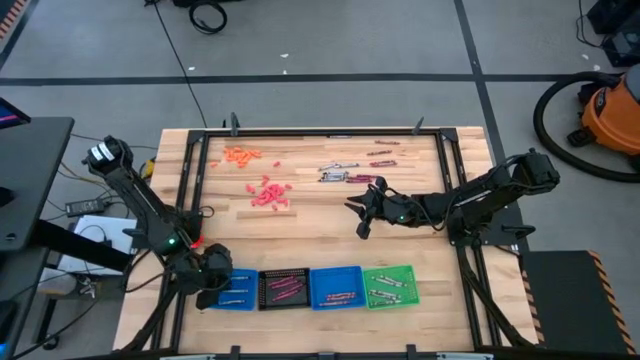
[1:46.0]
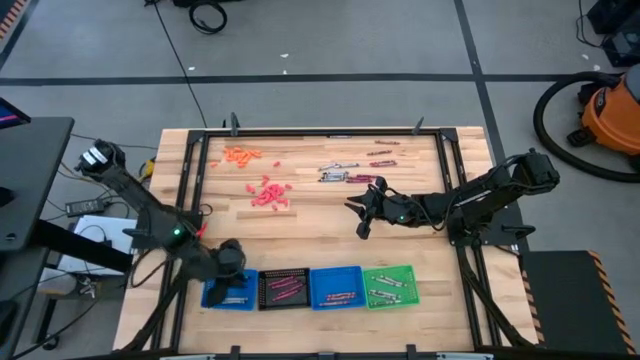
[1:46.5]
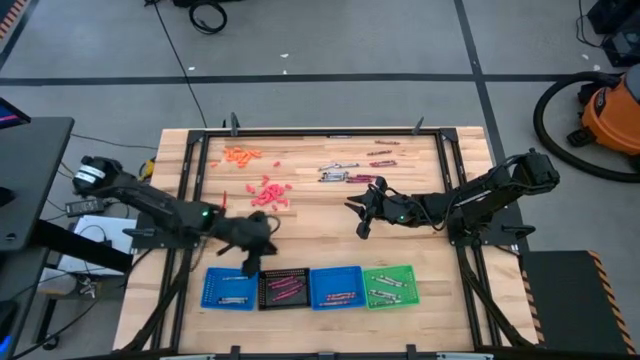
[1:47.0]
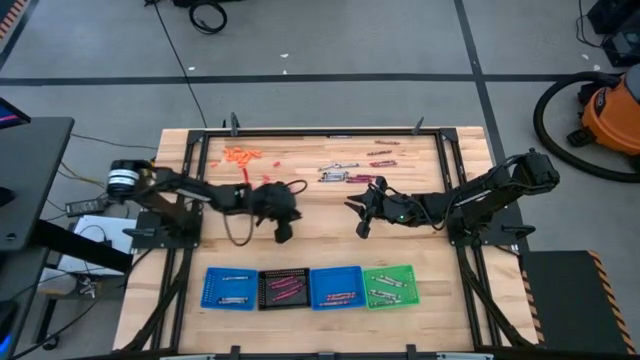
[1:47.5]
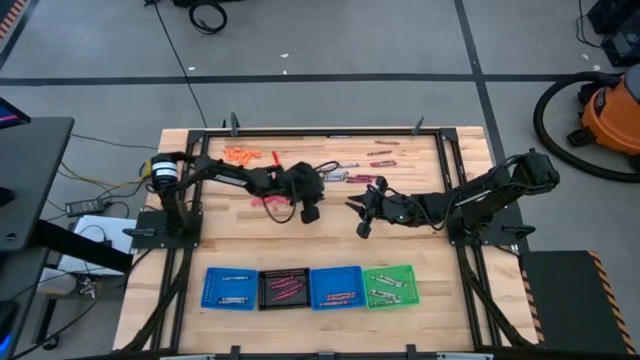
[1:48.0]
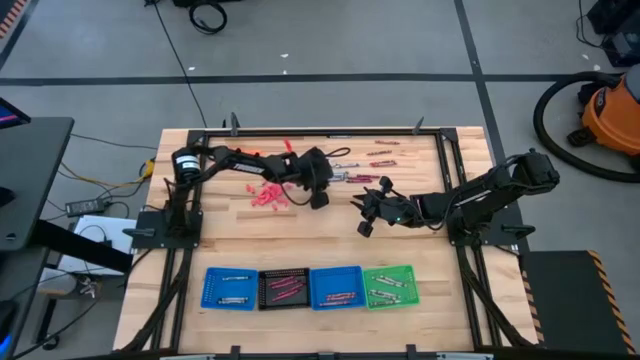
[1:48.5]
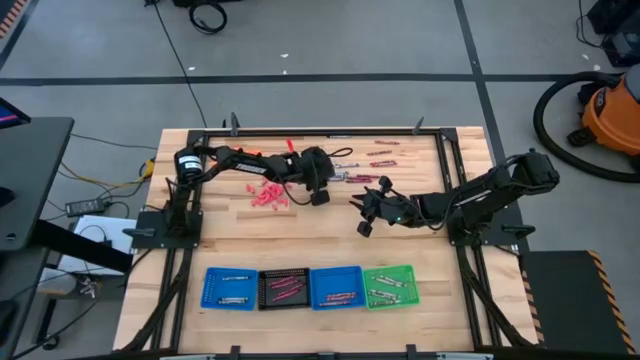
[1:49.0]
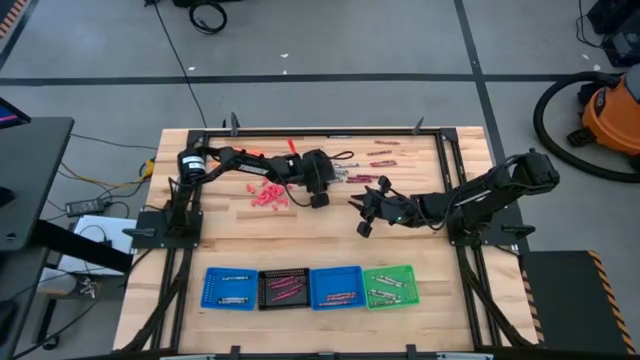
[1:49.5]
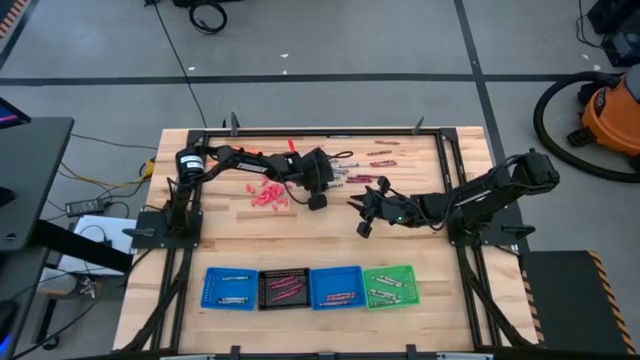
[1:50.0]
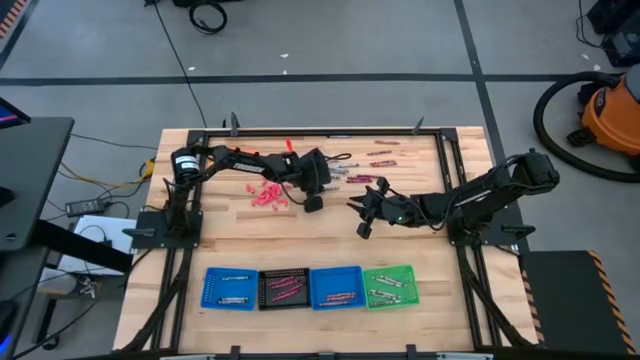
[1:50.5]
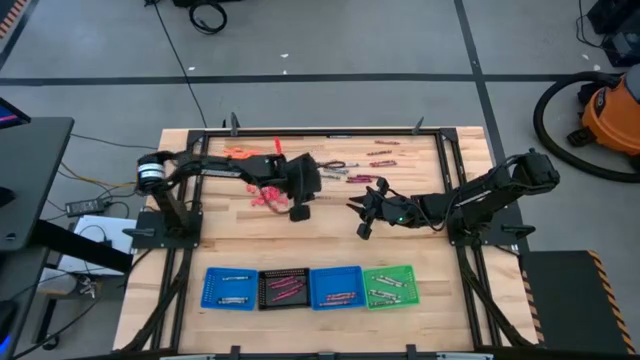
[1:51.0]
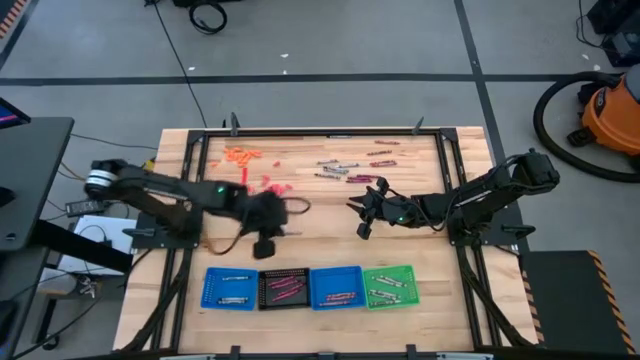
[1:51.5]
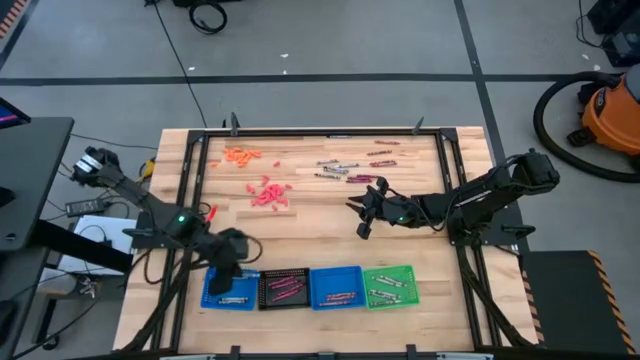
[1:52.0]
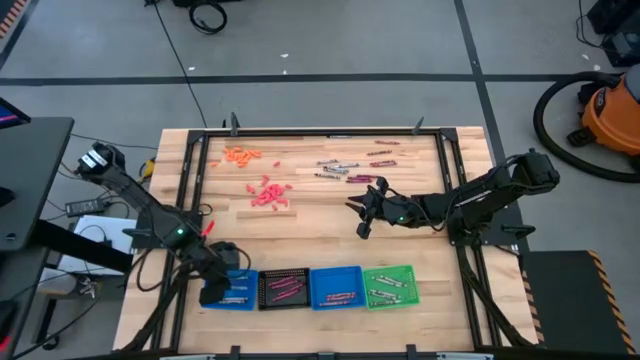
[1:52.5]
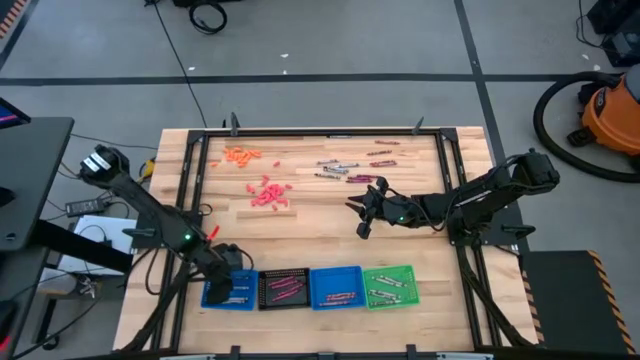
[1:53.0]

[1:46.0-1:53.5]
Task: Sort crayons
Put the black crayon into the left blue bin

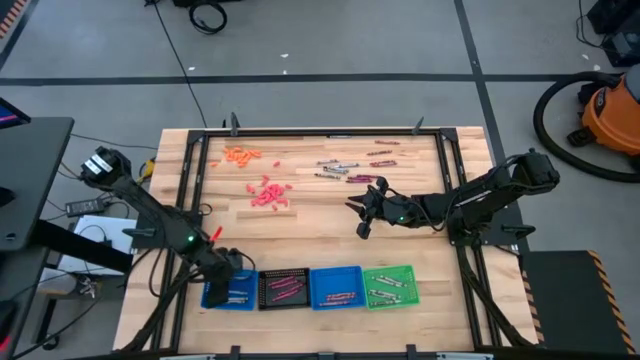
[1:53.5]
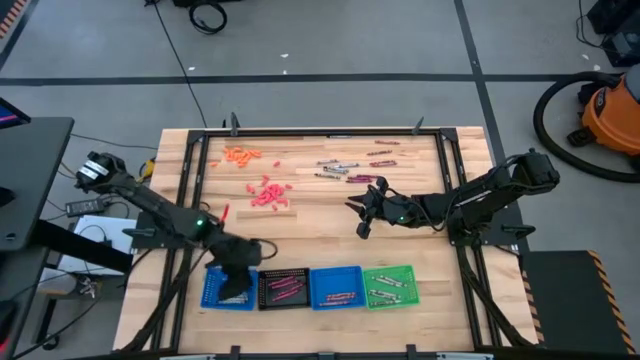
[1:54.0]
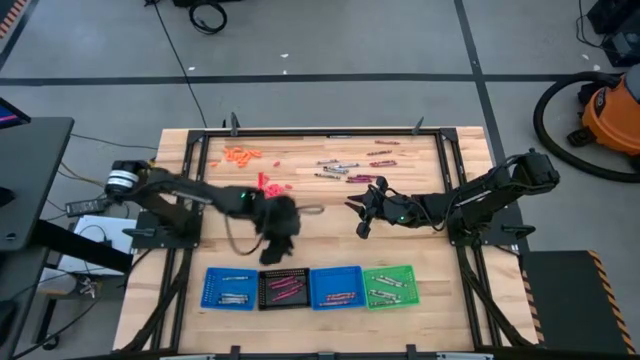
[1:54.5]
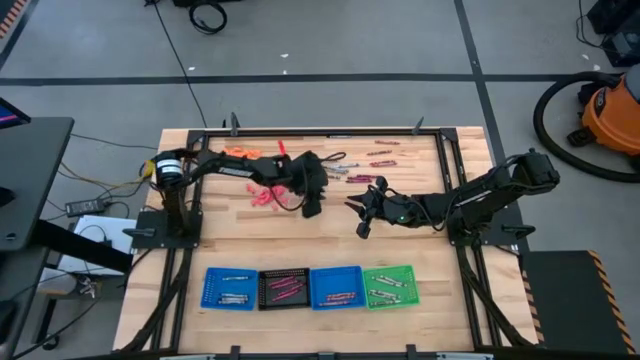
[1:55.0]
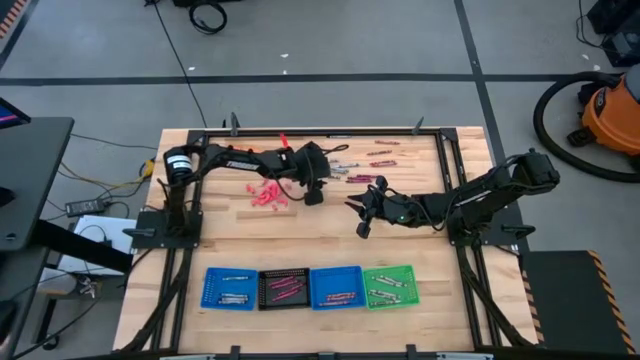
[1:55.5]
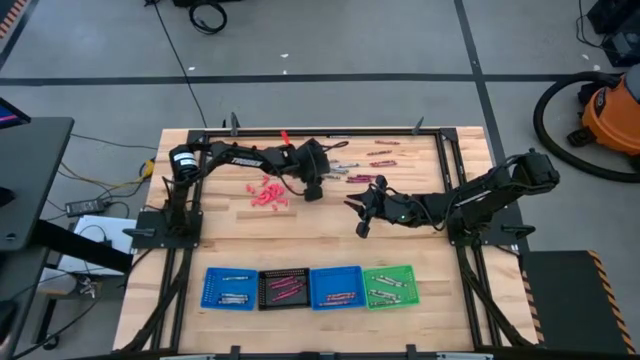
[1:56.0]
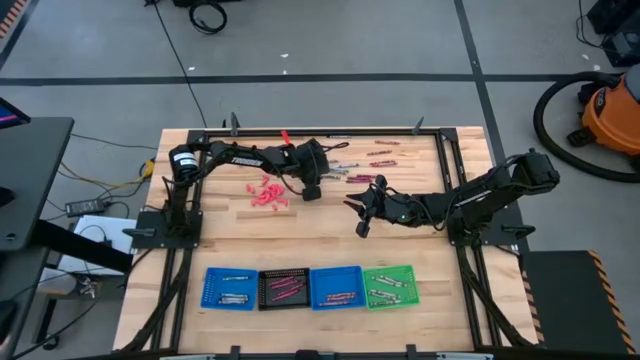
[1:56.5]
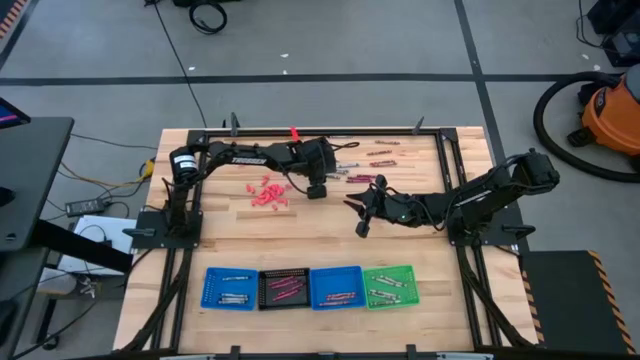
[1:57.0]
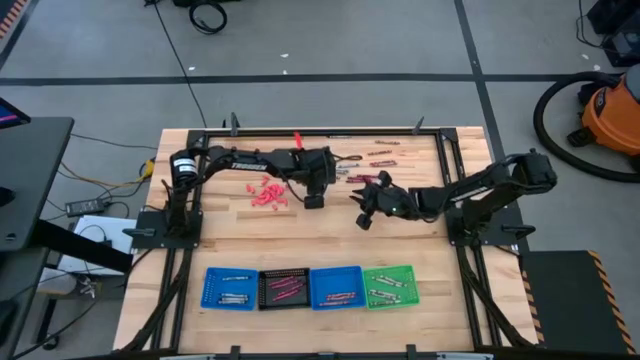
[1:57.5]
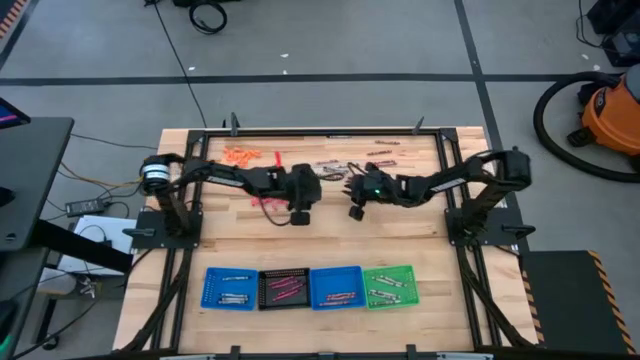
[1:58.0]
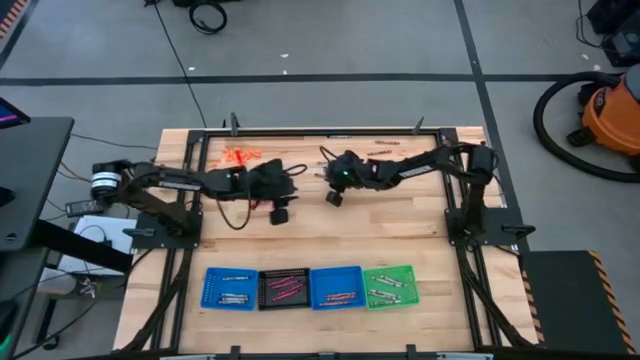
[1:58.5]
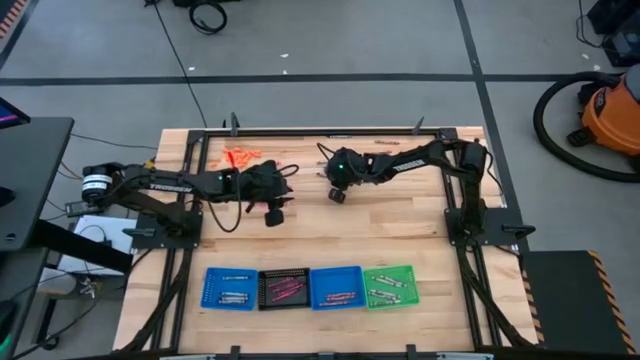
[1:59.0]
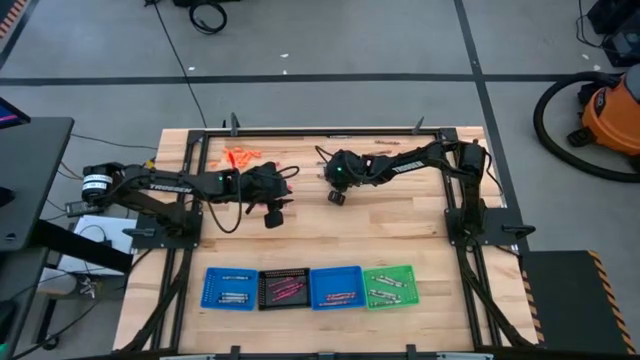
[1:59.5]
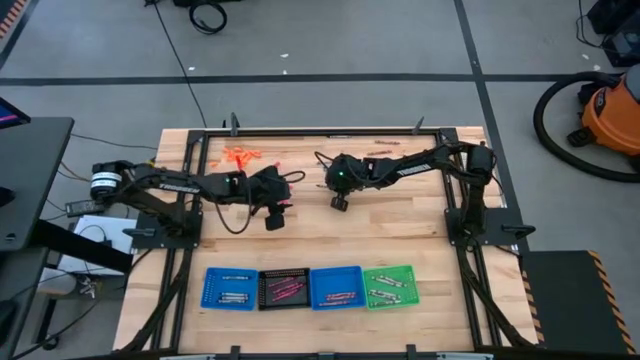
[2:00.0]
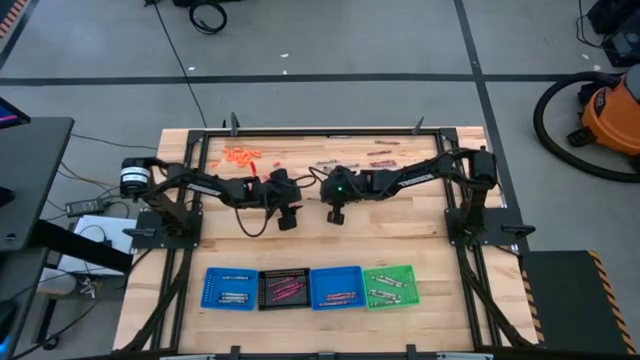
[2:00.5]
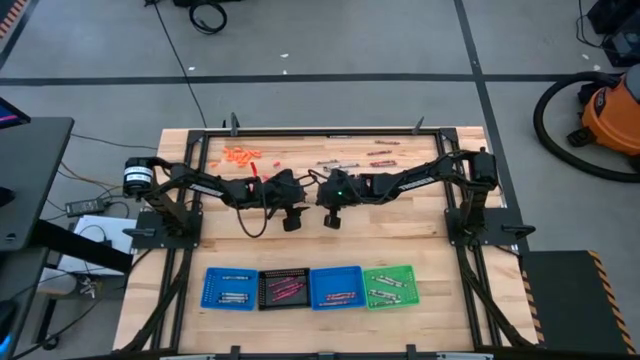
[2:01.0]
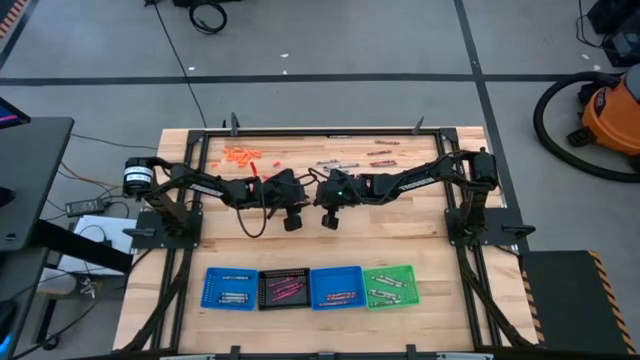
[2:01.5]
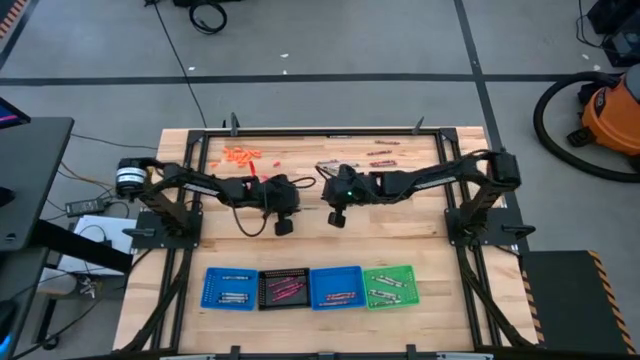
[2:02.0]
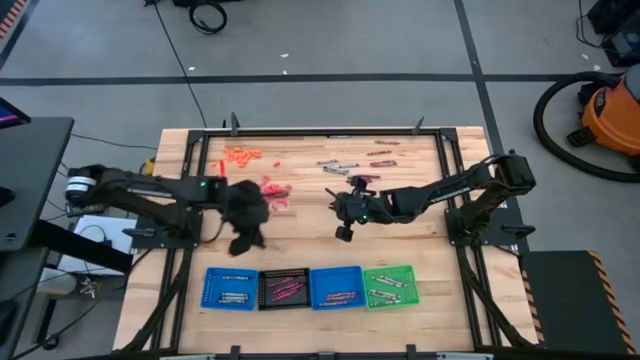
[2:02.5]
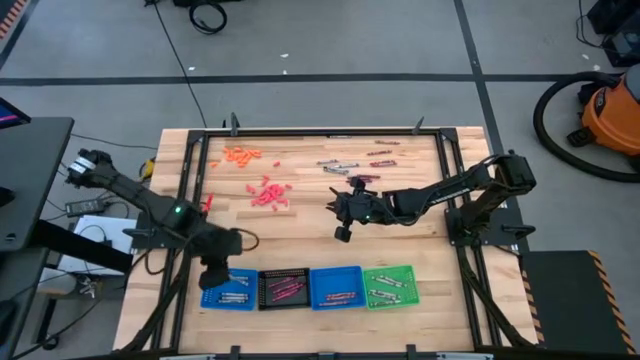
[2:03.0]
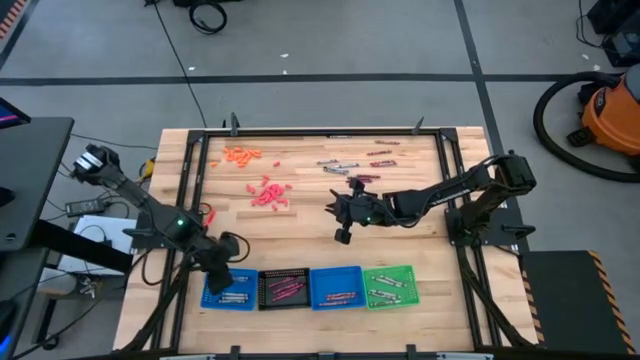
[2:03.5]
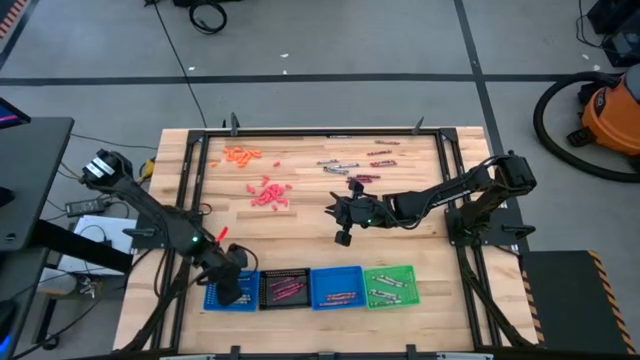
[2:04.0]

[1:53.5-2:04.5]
Put the black crayon into the left blue bin

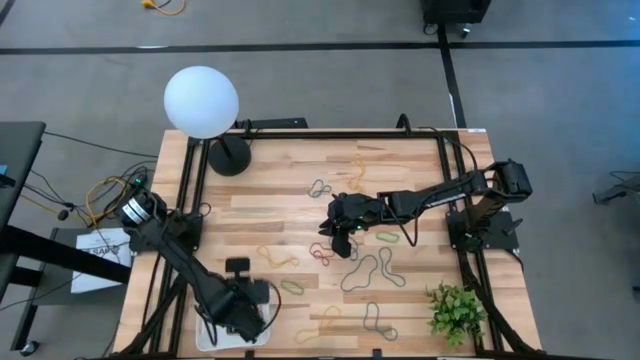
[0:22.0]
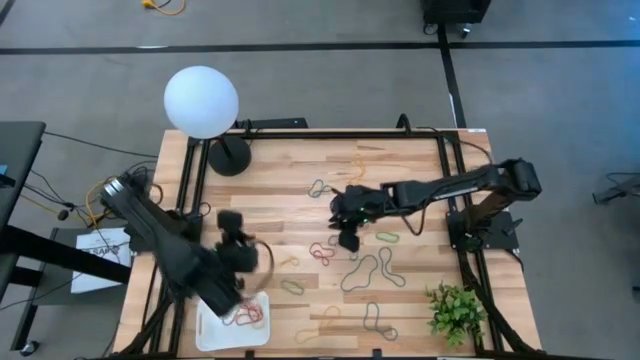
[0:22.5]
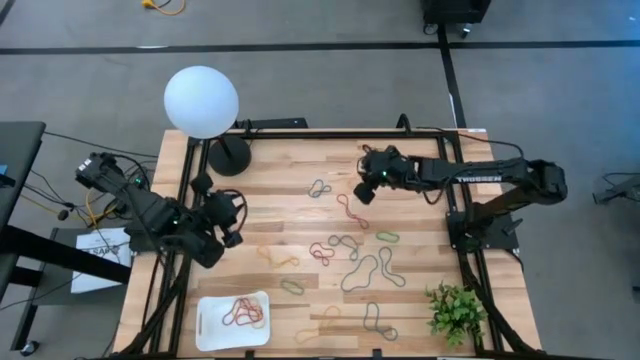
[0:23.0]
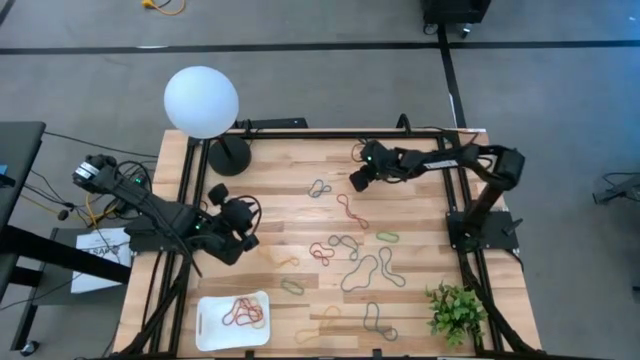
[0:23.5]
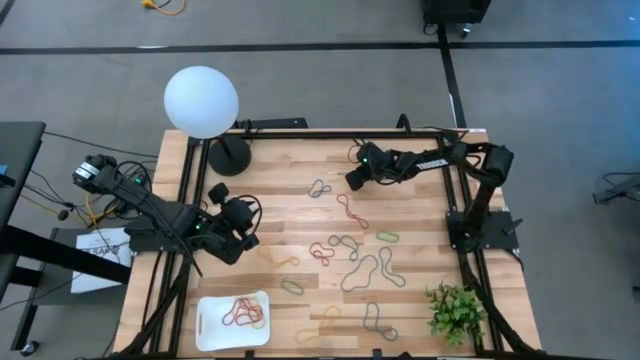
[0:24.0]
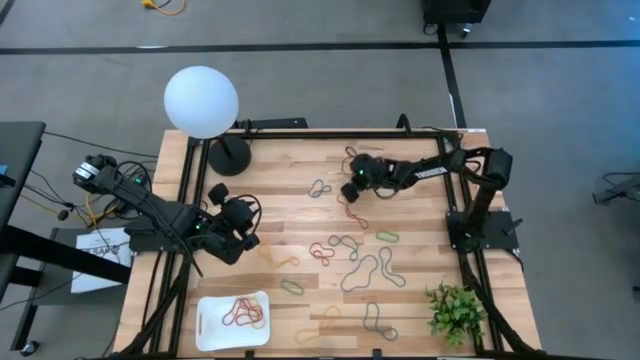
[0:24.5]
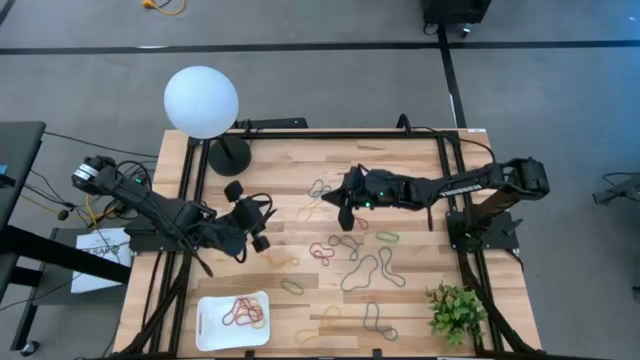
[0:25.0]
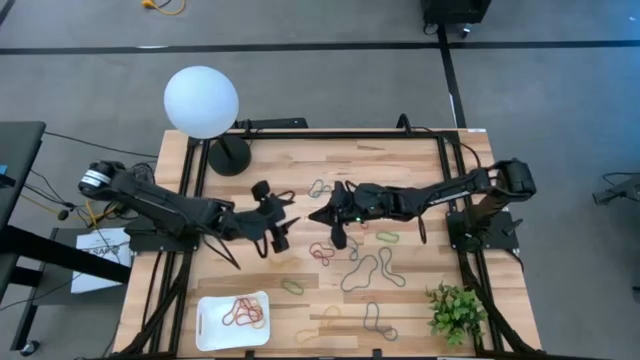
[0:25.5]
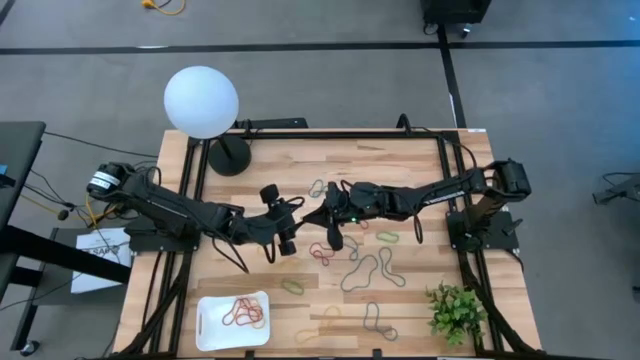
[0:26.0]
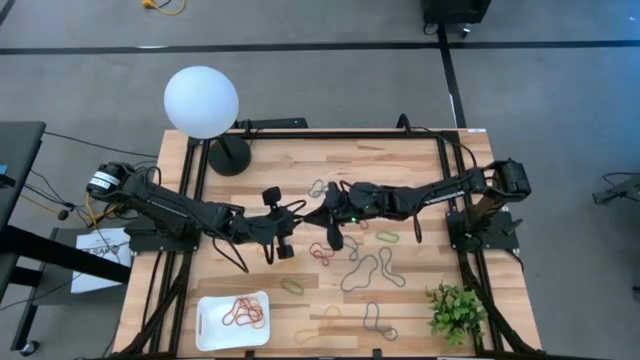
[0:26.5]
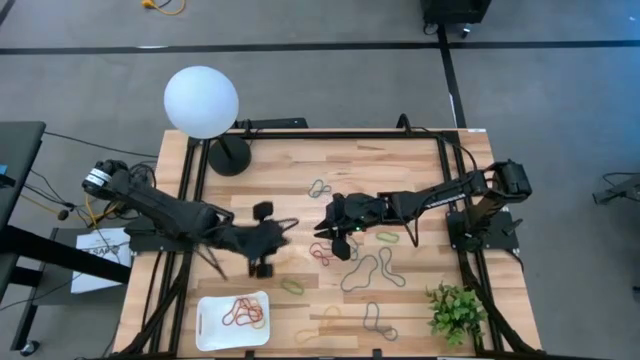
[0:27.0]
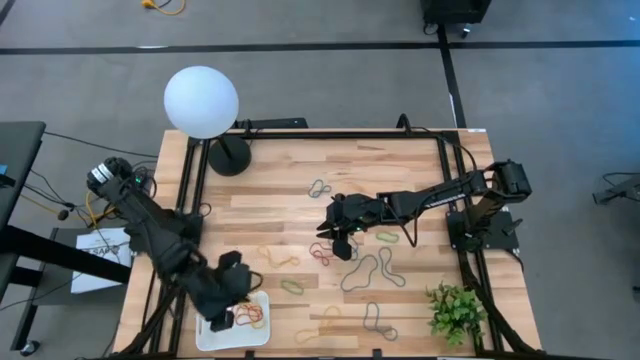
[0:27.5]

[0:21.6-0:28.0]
Task: Pick and place items into bin
Put the yellow rubber band into the bin
